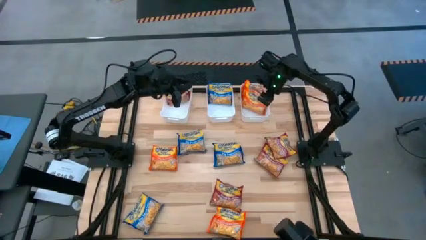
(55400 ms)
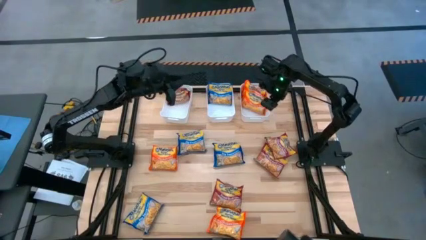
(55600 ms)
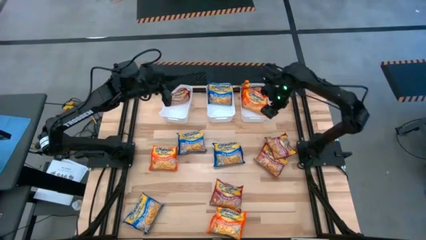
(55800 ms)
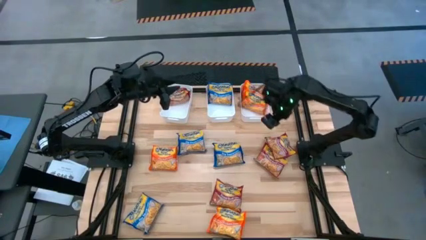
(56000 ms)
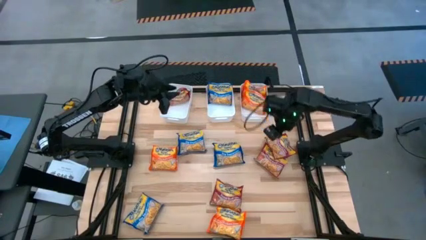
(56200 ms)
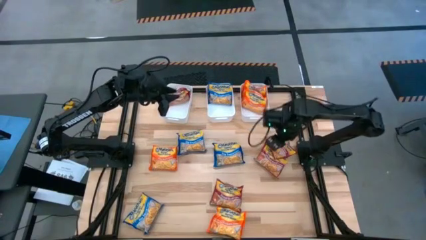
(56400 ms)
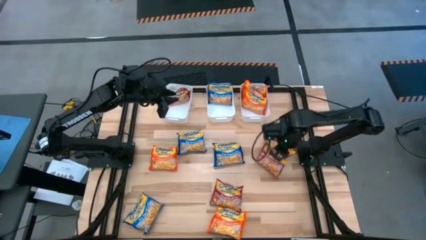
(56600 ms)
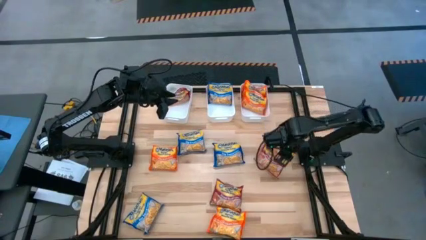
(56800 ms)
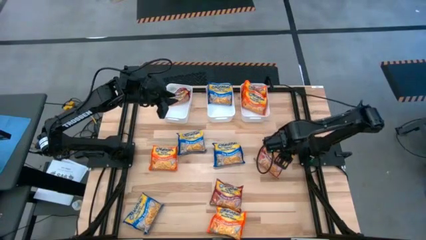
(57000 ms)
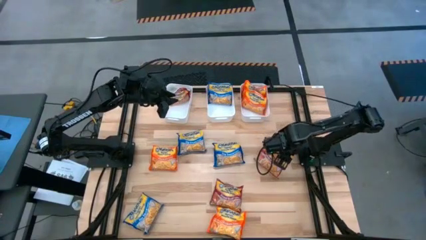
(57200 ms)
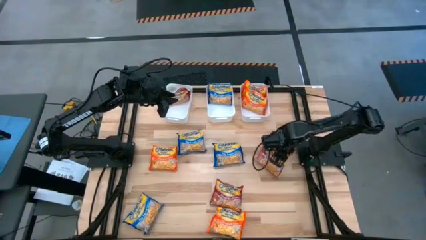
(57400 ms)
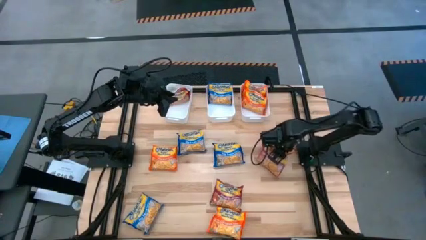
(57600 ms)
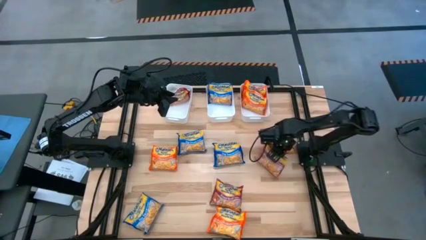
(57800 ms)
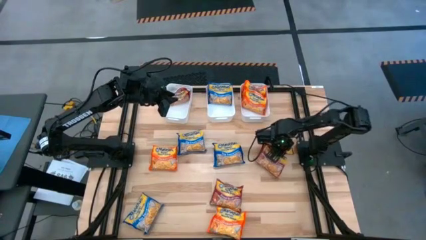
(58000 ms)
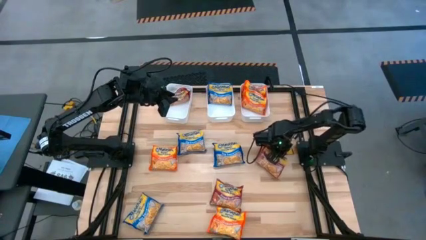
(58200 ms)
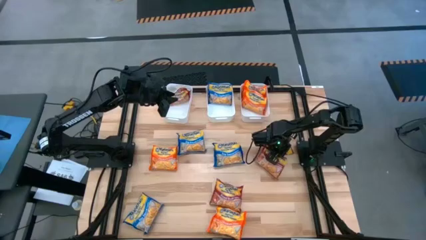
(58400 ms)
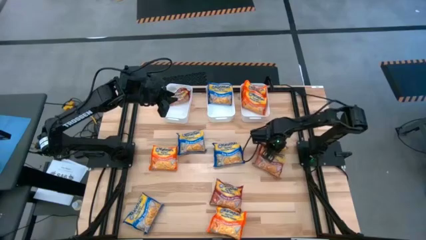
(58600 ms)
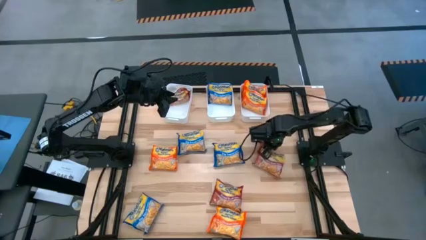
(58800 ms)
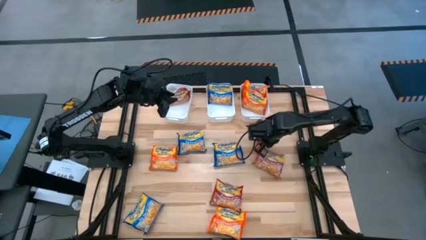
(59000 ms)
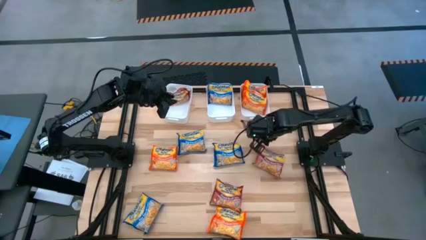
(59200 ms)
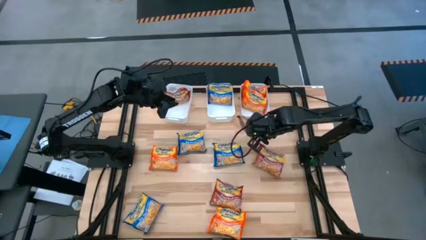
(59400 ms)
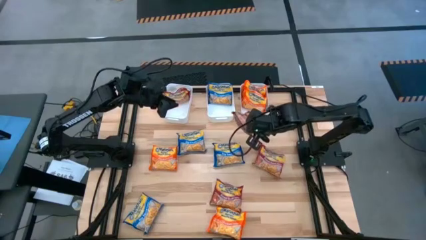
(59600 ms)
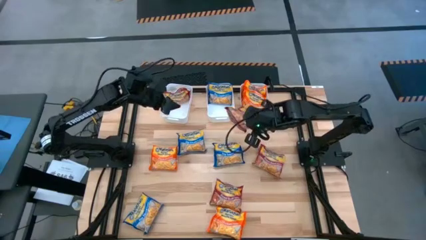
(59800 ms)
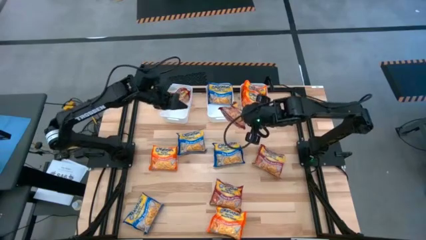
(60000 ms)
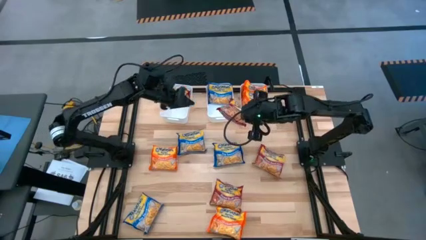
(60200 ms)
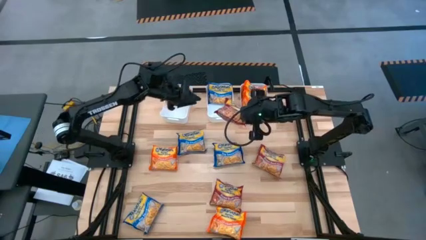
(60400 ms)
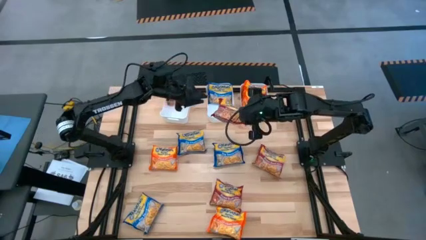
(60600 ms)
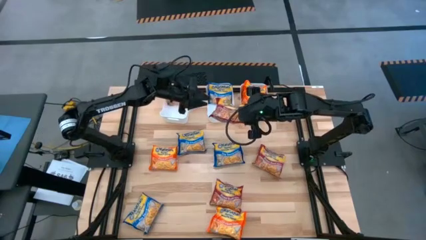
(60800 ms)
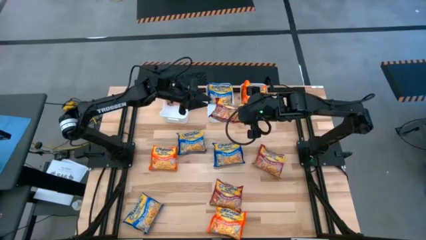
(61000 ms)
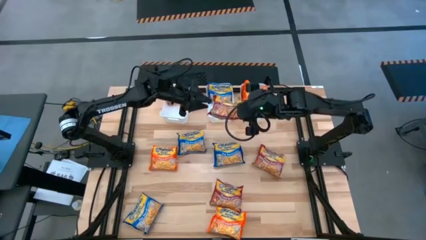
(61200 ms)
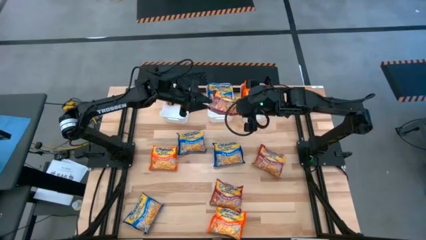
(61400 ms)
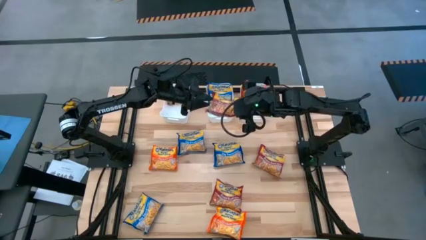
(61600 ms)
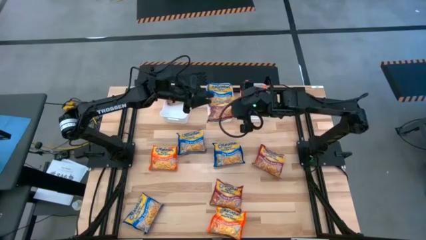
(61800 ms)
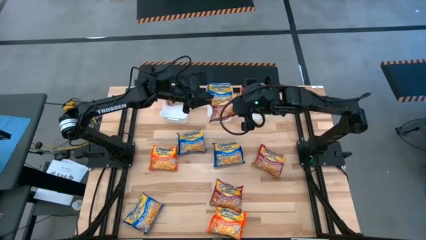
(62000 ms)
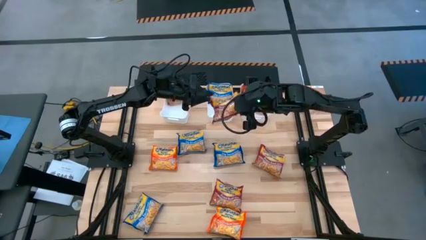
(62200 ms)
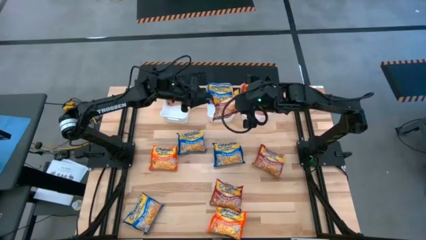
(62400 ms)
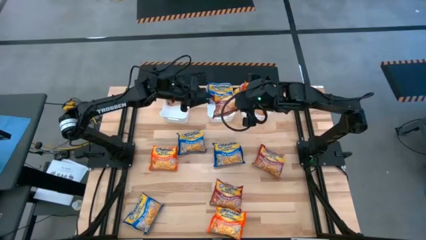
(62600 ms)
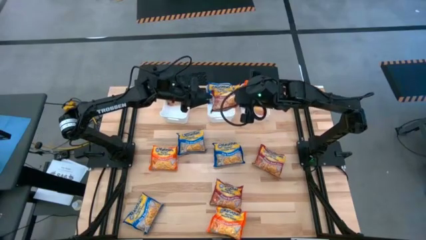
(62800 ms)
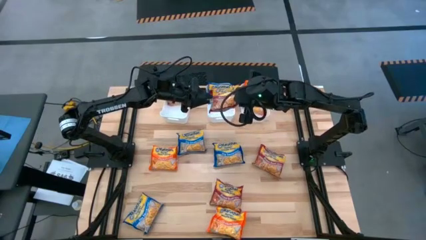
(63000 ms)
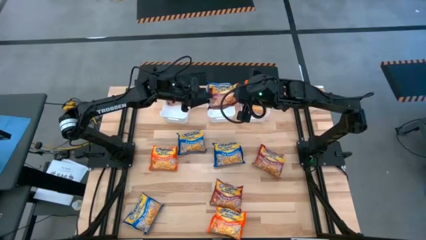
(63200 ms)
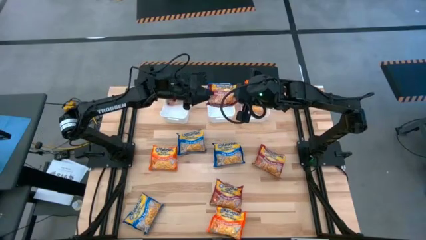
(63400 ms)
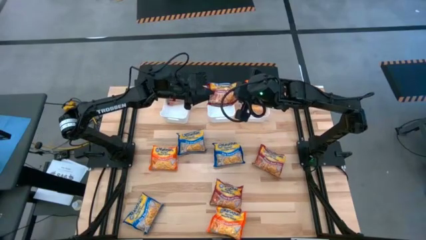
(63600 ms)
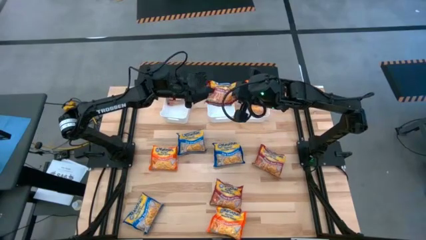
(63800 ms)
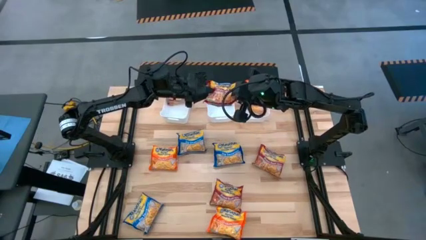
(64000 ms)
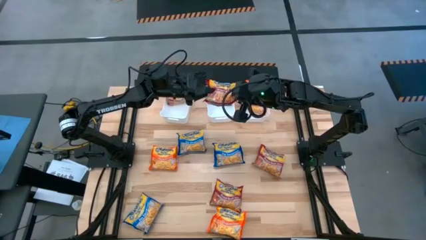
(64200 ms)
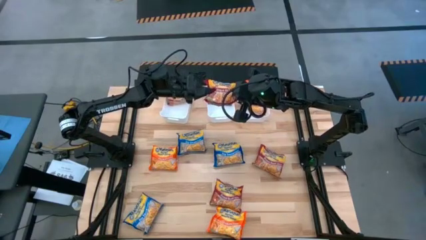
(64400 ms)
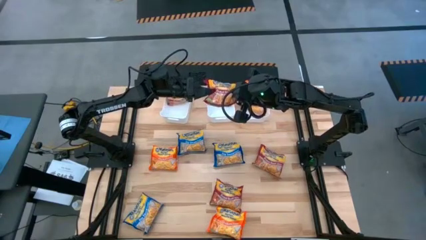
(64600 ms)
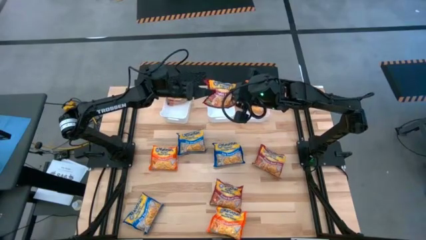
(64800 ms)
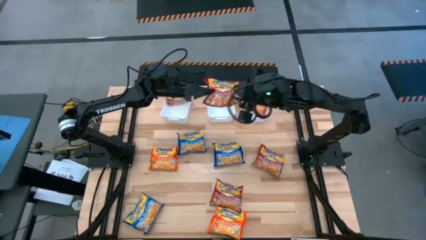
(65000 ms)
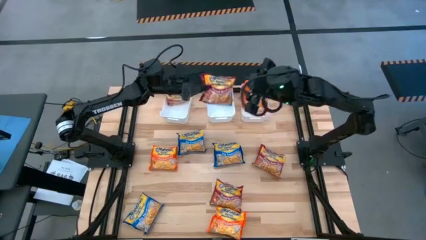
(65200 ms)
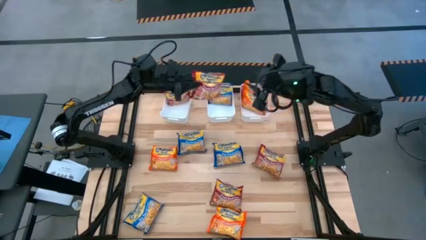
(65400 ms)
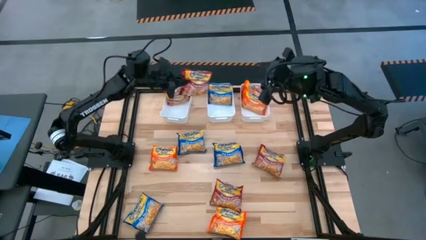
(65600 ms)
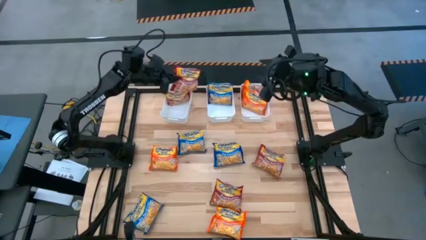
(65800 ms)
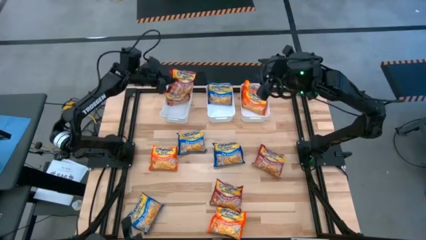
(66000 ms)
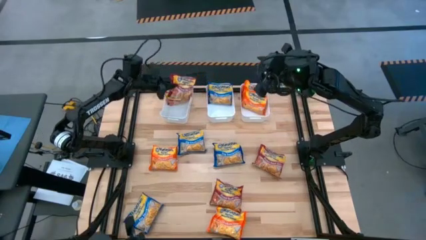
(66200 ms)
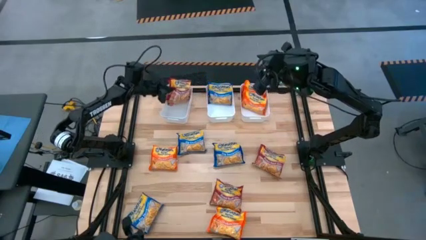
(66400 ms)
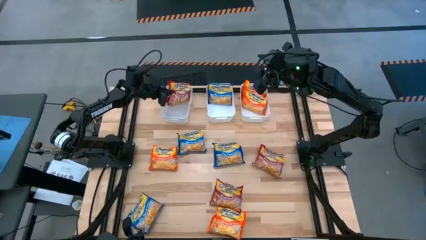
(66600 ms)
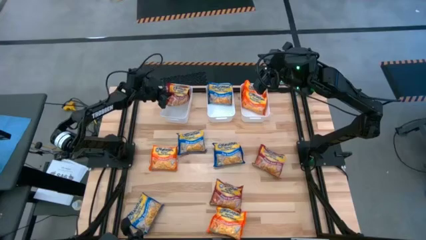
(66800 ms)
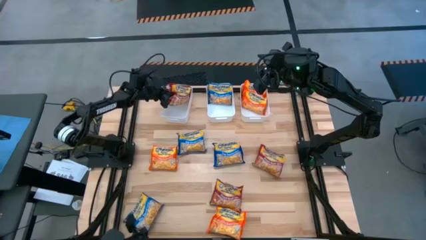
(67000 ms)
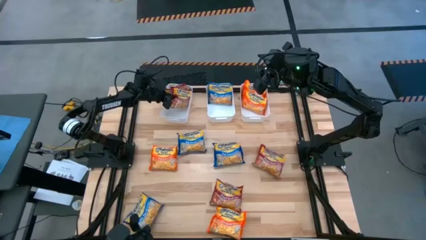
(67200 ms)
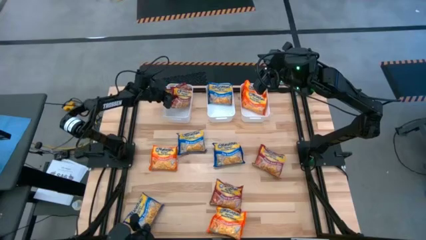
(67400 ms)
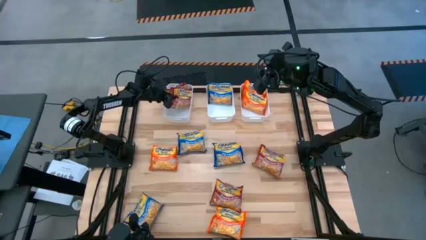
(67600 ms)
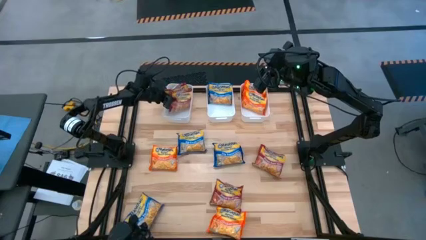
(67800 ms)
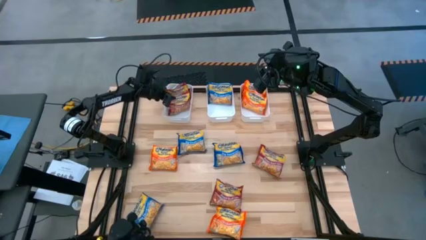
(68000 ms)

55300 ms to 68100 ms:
Task: Sort Maruchan noodles
Put the top right red noodle pack into the top left white bin

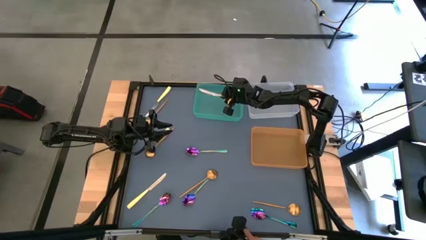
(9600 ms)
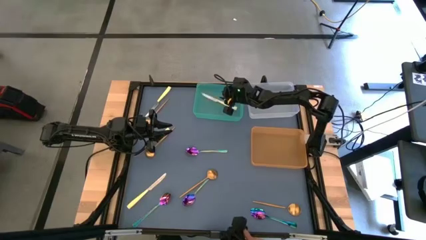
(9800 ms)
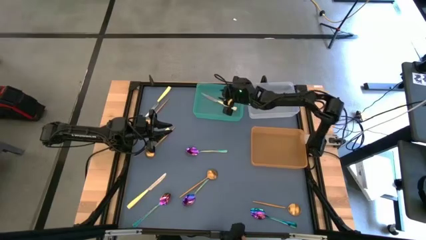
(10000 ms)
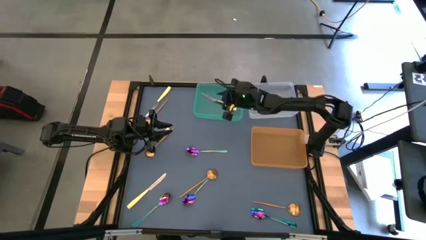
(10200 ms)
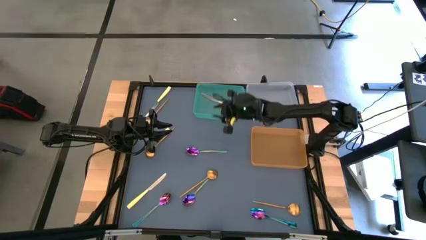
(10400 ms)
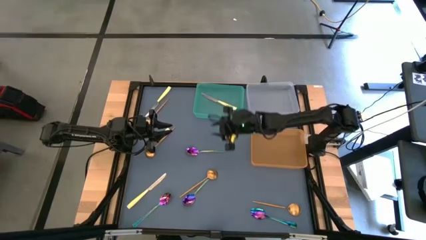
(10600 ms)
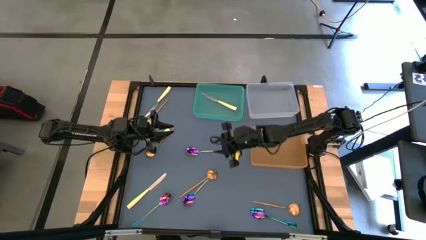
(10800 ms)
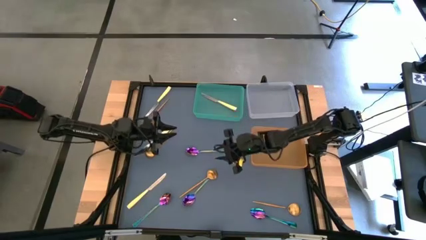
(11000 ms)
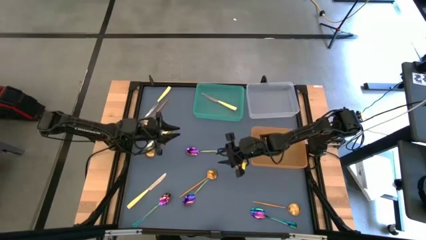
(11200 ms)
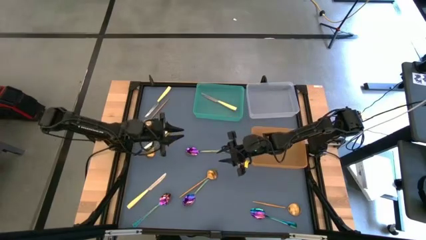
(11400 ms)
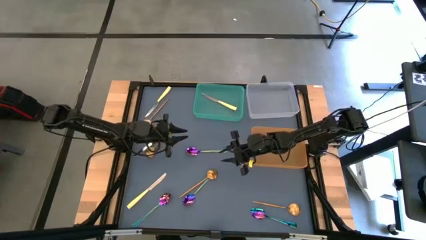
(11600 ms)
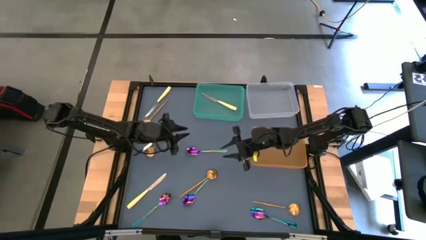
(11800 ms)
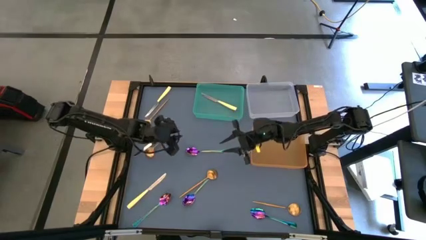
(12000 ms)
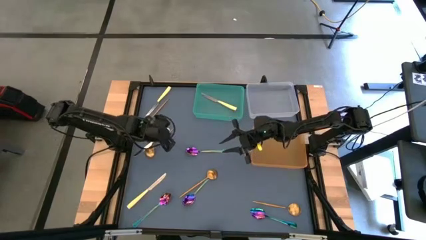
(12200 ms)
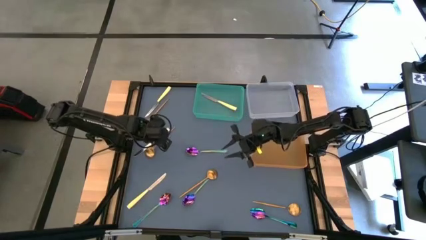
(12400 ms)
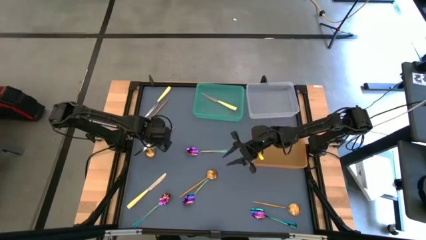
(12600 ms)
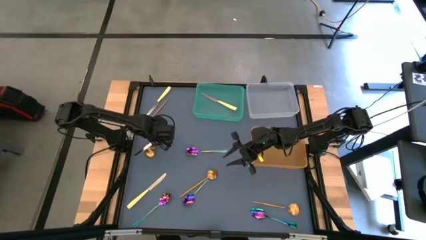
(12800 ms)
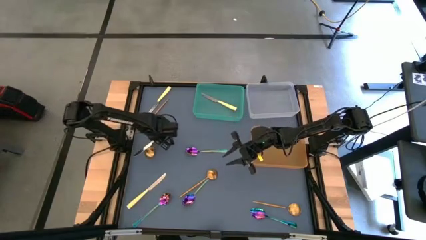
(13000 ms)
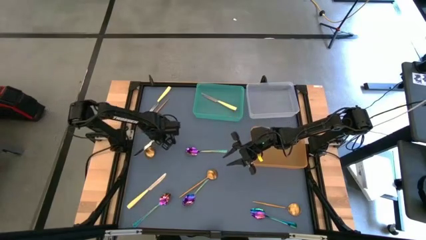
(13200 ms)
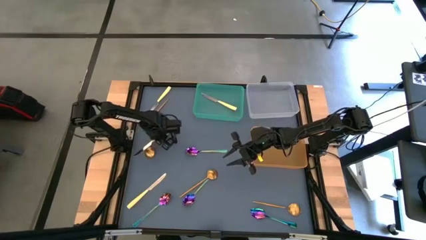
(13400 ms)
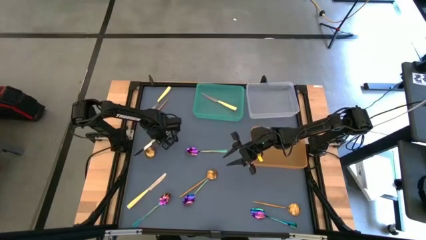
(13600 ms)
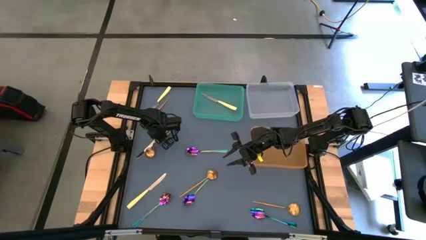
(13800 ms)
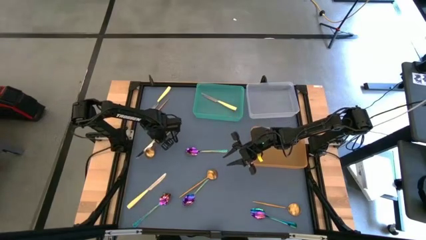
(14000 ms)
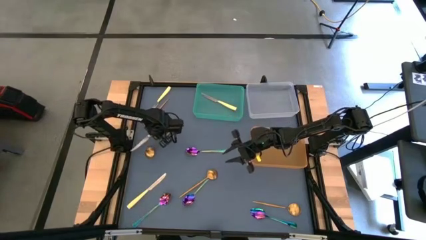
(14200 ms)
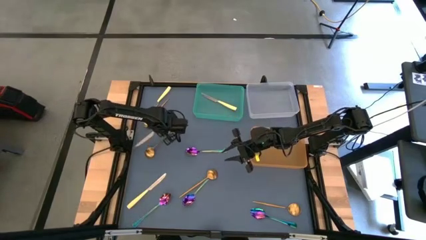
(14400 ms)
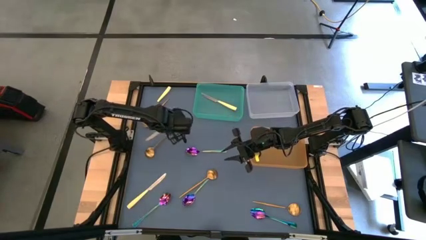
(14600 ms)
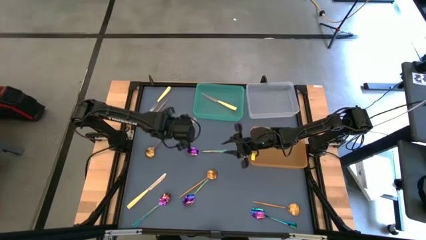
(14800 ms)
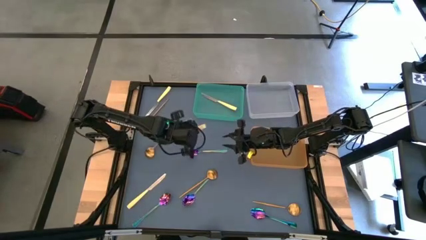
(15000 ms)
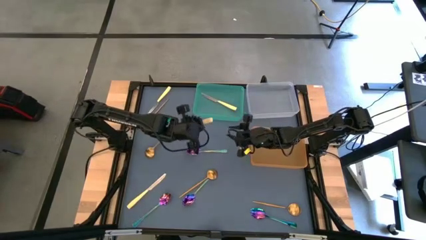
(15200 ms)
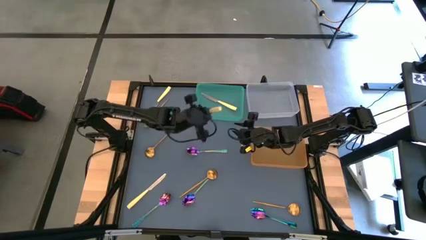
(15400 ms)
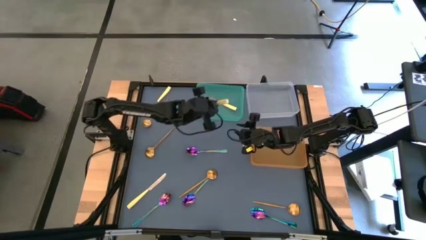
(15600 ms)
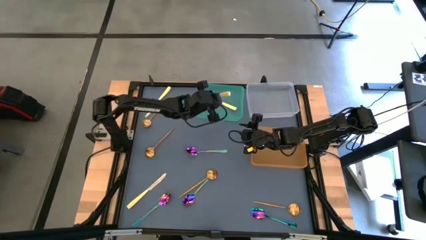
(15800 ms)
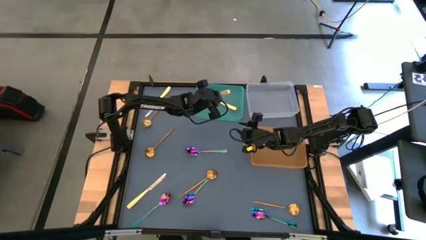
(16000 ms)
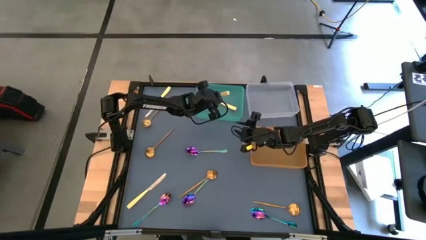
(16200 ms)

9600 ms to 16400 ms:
Task: Sort silverware by color (type)
Put the yellow table knife into the green bin
